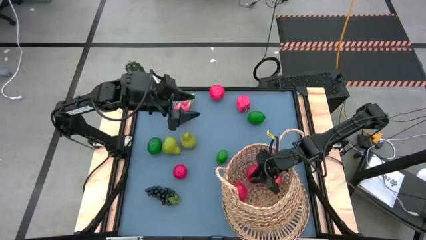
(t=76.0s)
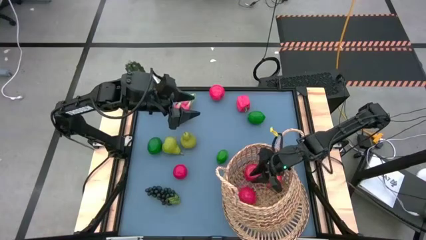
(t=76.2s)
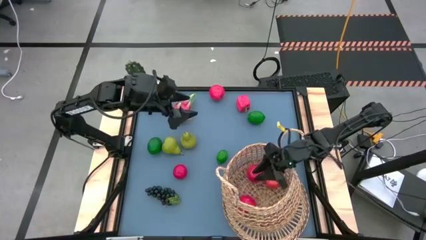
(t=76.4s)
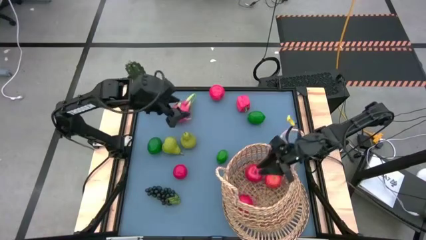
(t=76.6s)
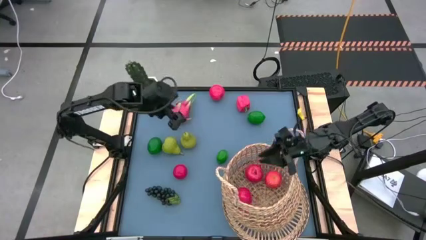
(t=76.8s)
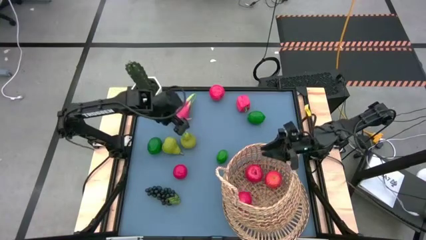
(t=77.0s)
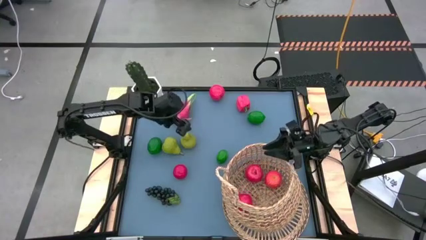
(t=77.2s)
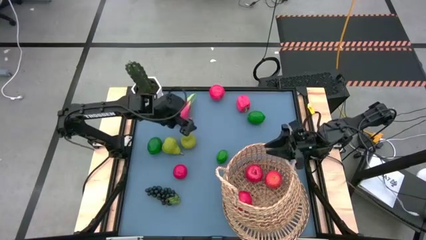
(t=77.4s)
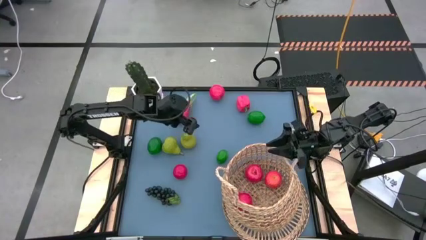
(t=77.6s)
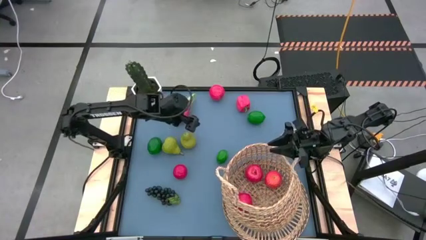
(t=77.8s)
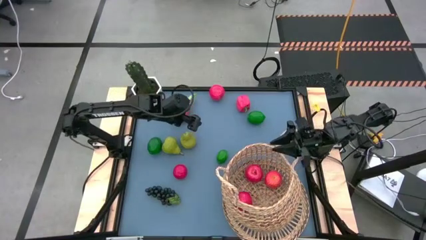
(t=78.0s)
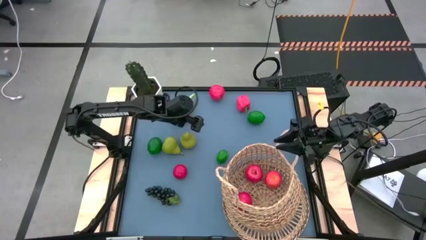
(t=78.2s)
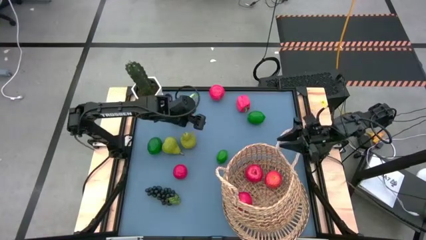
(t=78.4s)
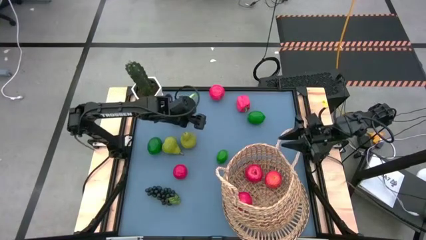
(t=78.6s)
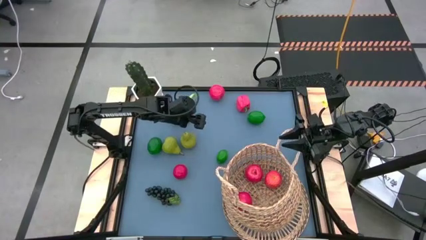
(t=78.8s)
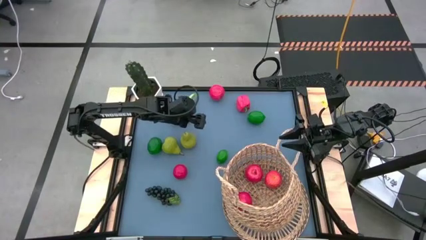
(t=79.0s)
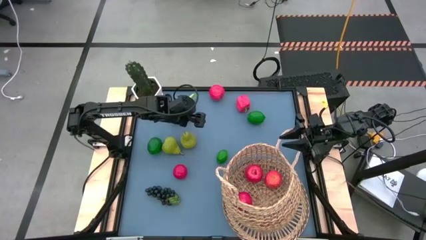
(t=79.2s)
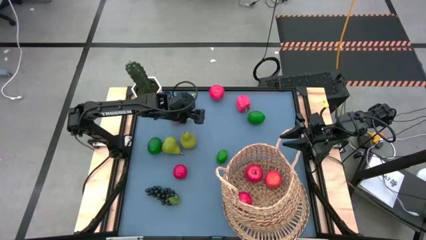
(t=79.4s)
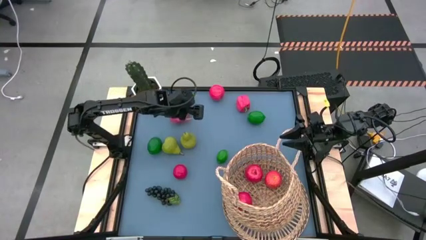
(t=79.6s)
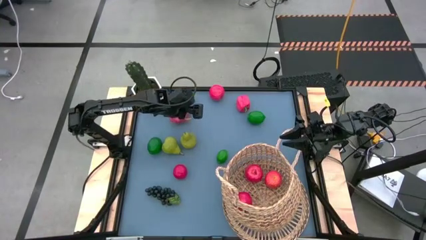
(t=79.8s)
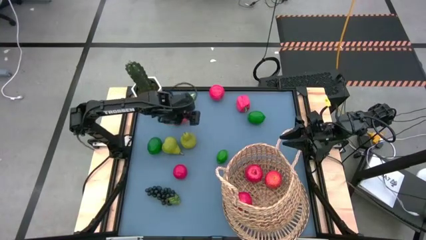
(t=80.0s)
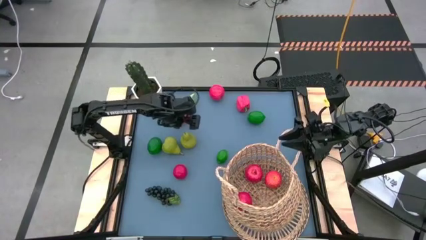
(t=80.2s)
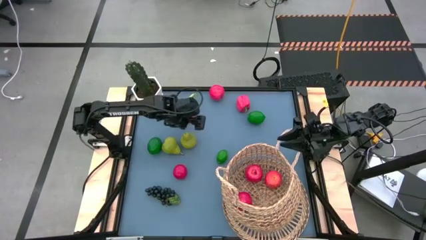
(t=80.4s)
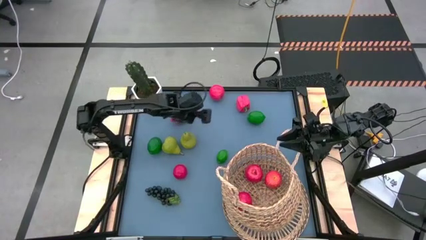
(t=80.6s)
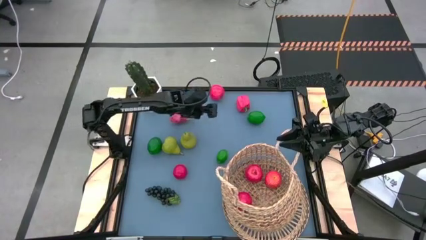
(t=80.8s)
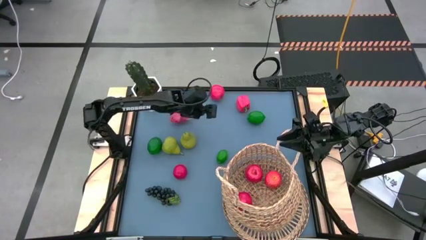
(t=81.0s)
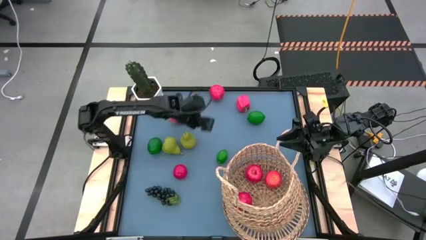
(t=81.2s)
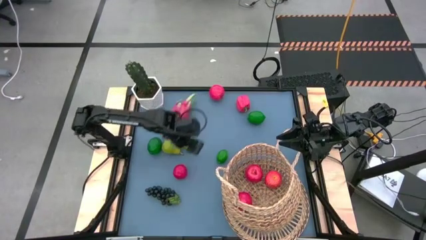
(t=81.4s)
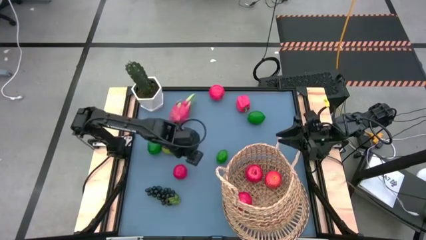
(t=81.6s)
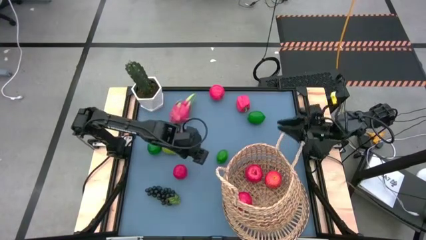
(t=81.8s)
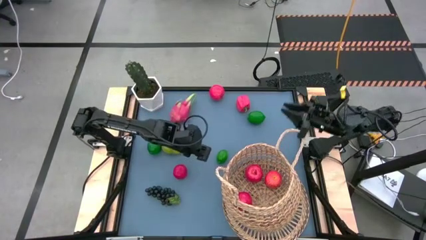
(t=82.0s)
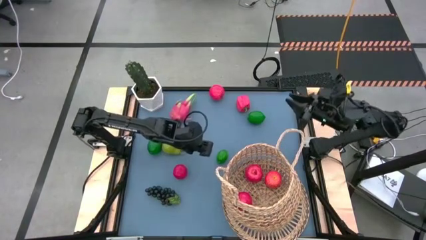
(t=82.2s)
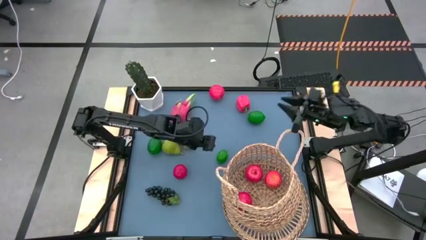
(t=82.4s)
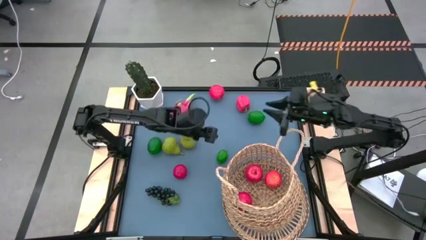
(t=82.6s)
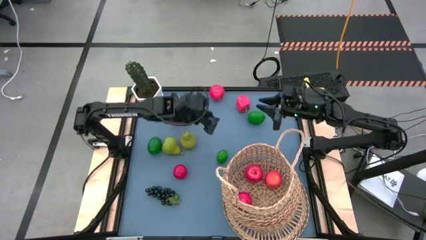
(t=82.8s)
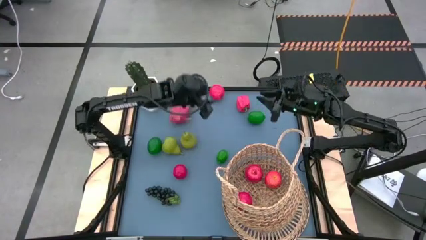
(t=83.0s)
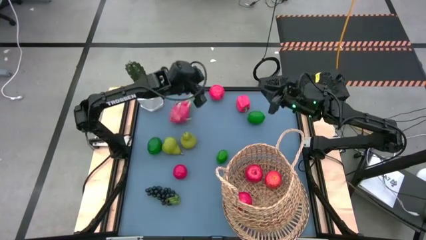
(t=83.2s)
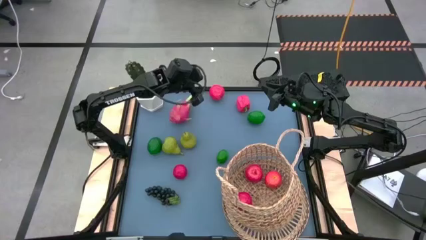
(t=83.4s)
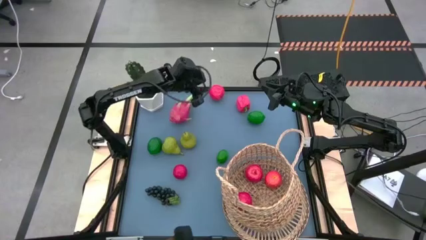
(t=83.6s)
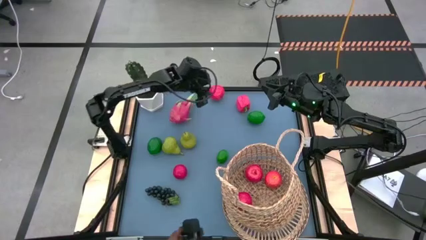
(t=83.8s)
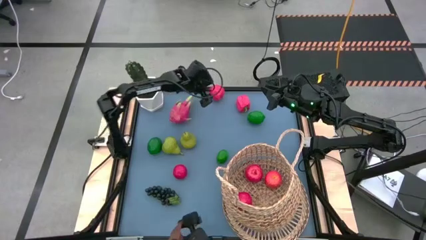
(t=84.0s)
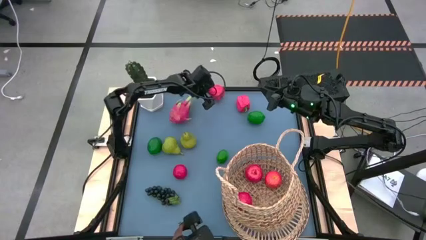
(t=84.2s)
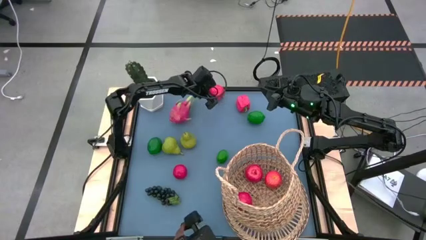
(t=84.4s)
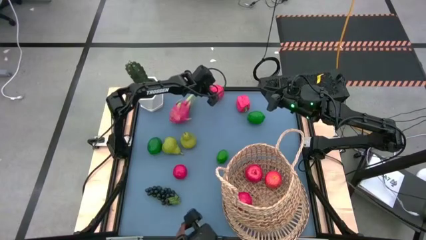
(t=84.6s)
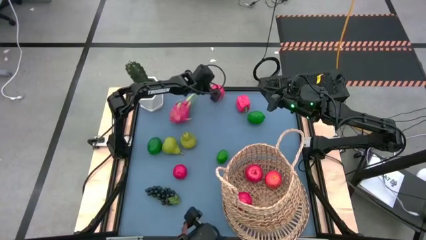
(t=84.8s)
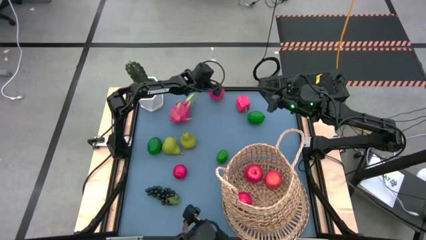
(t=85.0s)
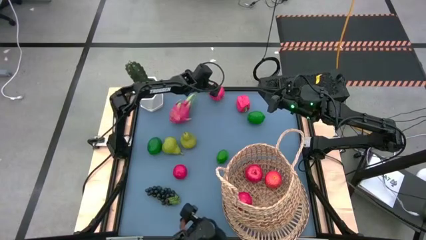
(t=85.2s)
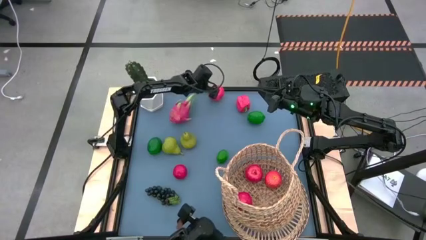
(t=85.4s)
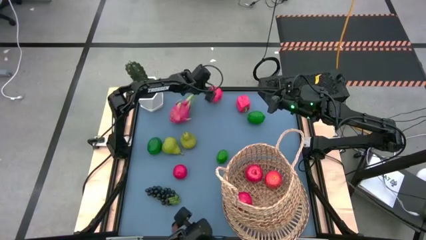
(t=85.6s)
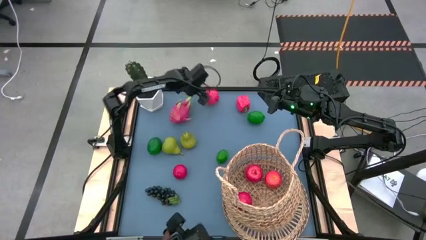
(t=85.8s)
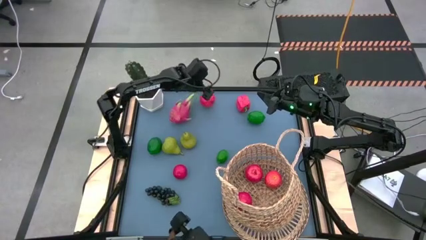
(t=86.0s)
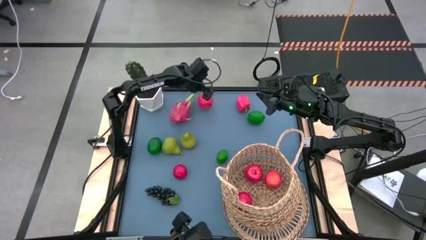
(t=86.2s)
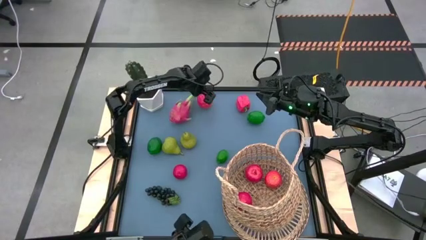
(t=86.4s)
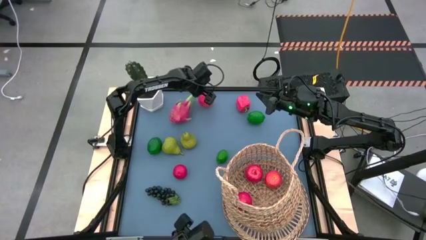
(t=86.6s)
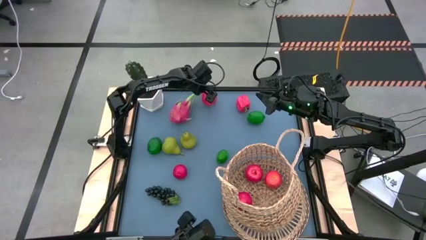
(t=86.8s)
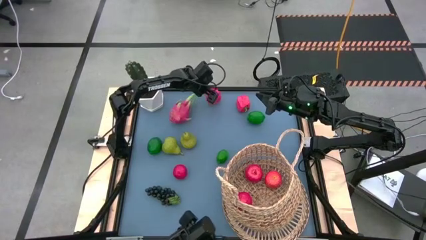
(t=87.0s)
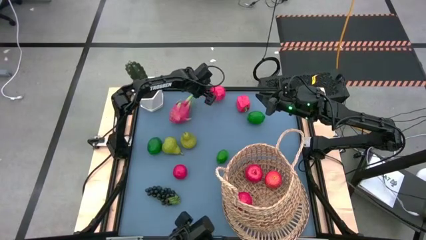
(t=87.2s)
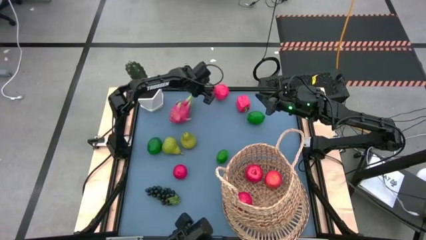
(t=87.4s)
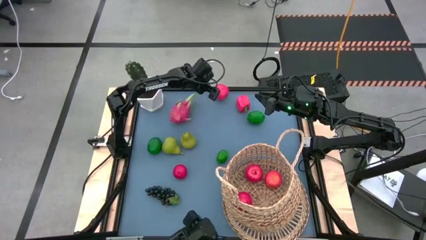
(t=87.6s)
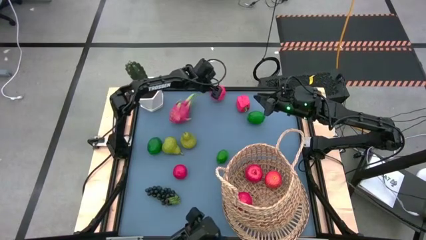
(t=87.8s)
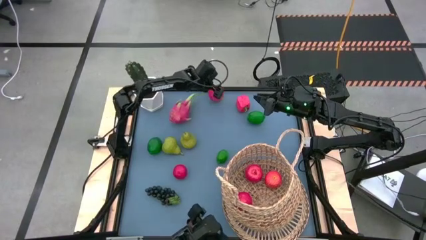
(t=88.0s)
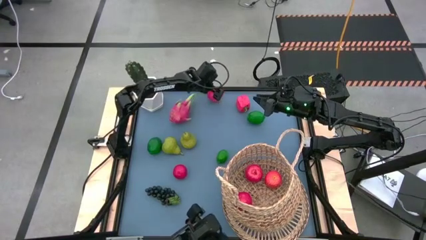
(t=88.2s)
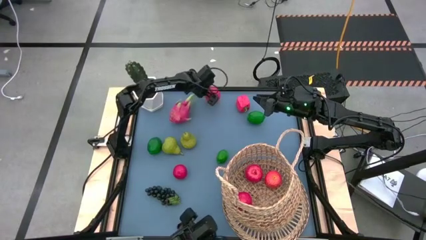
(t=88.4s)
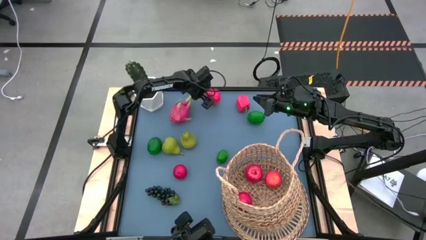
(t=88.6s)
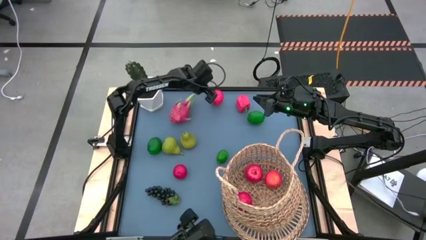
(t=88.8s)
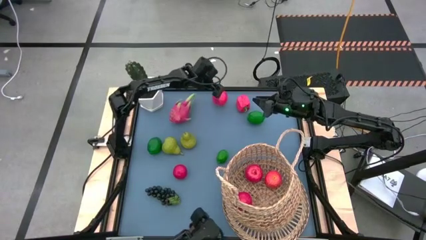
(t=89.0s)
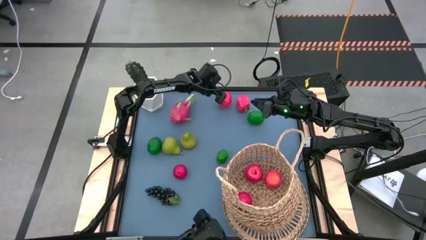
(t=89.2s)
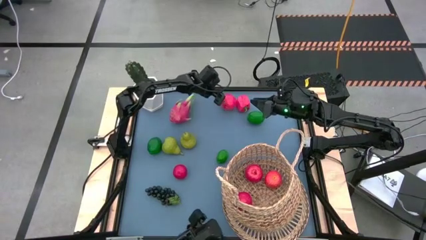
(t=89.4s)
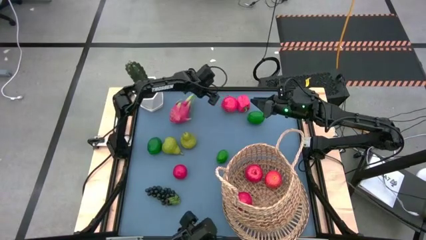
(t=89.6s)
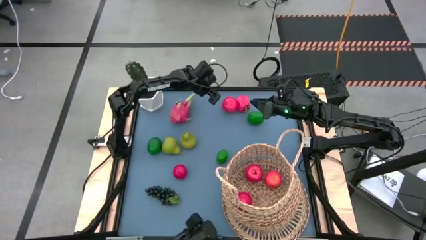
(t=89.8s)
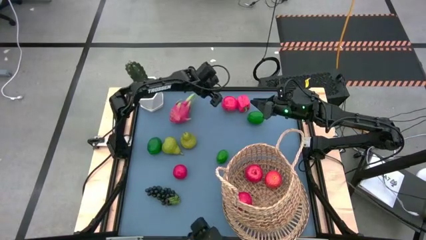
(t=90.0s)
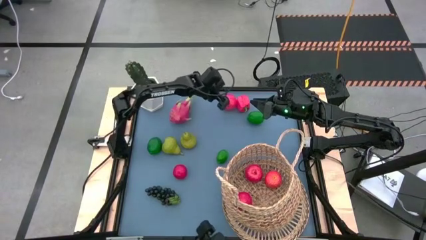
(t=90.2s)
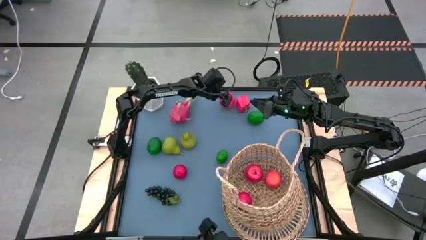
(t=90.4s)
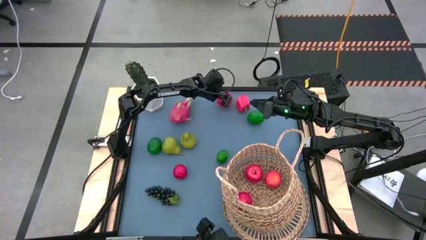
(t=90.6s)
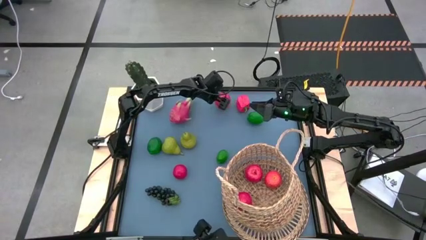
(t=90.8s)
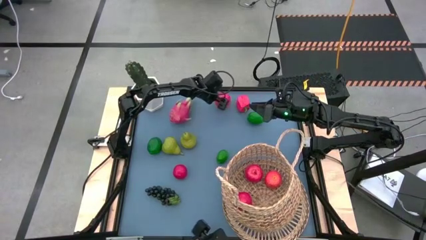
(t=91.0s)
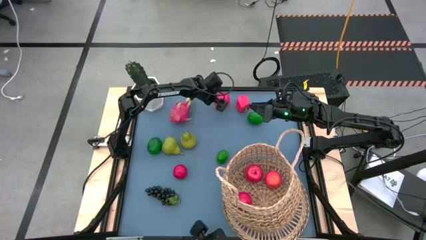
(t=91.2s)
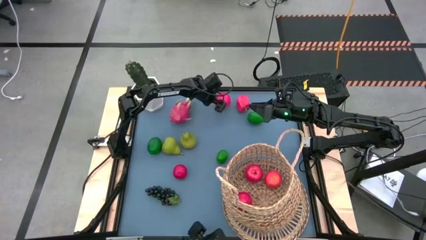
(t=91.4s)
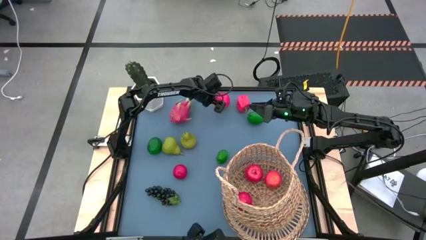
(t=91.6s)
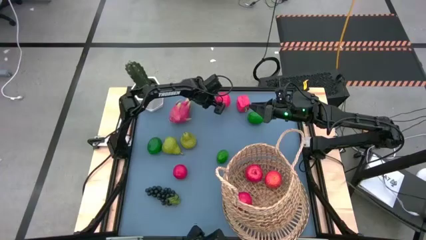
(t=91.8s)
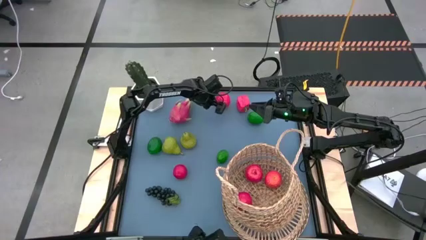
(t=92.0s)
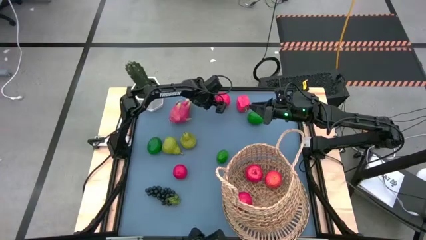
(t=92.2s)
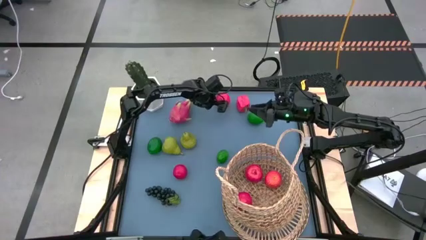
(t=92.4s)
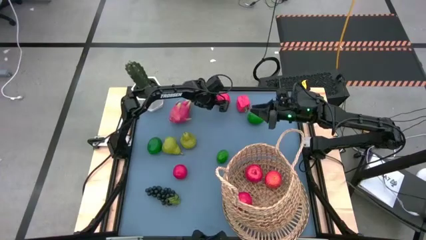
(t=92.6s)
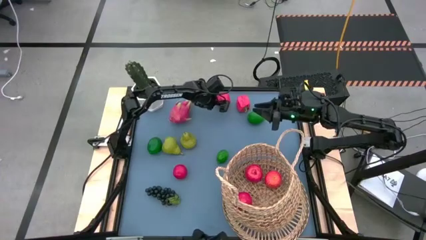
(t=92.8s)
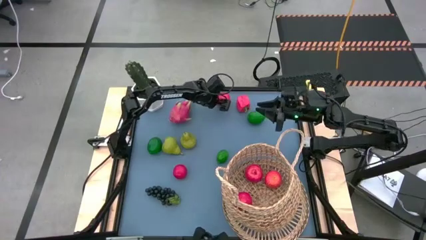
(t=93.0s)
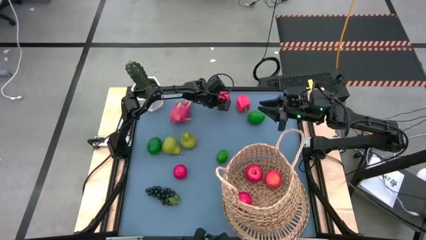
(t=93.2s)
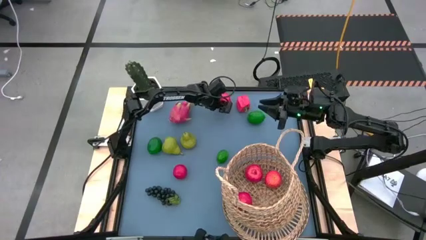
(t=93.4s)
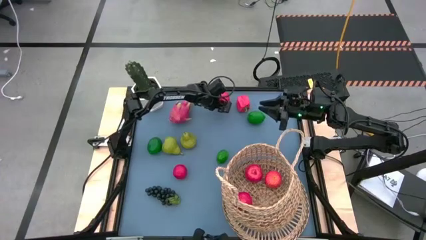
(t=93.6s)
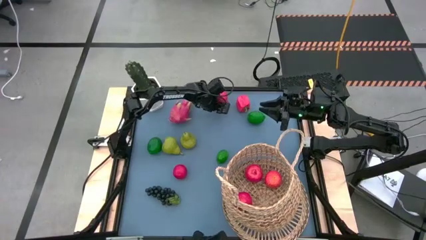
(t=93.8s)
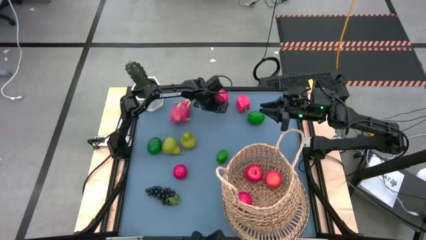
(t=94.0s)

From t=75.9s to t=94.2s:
Task: Build produce basket
Put the red apple into the brown basket
